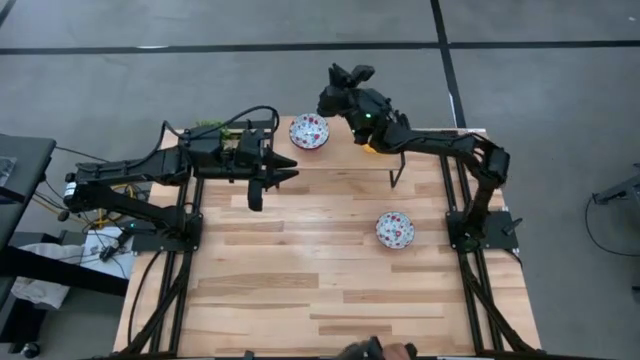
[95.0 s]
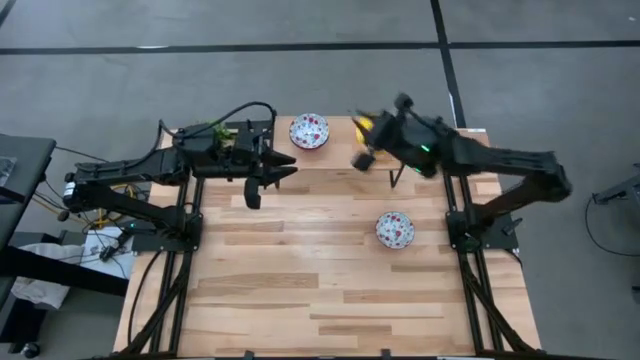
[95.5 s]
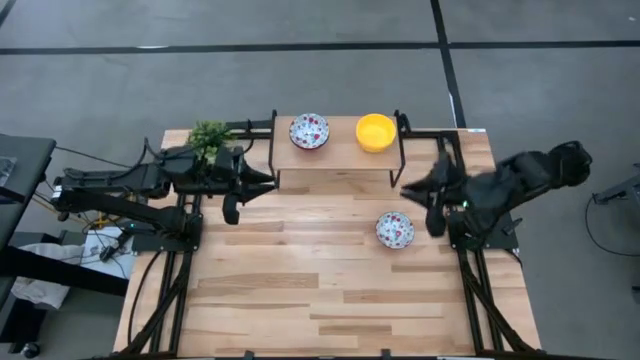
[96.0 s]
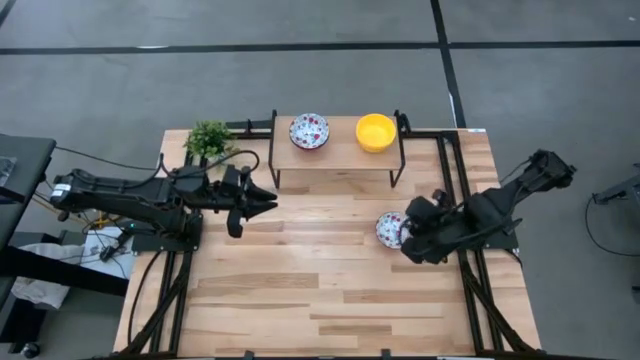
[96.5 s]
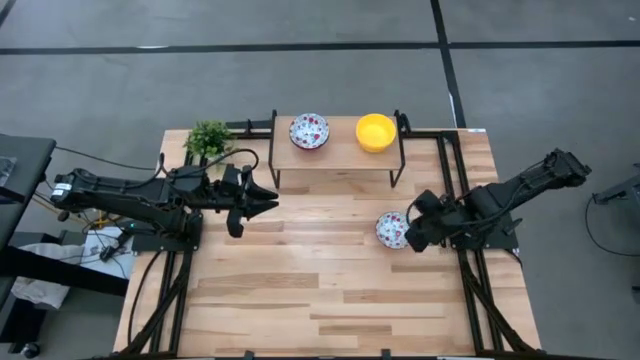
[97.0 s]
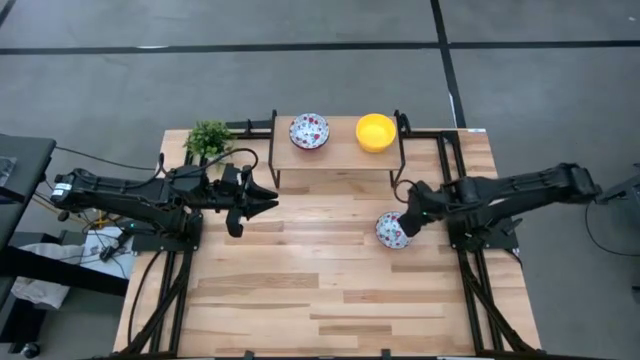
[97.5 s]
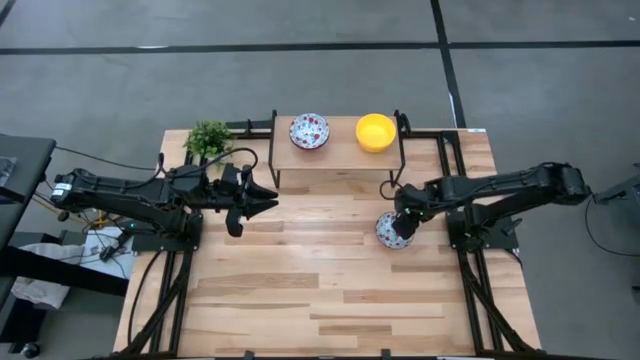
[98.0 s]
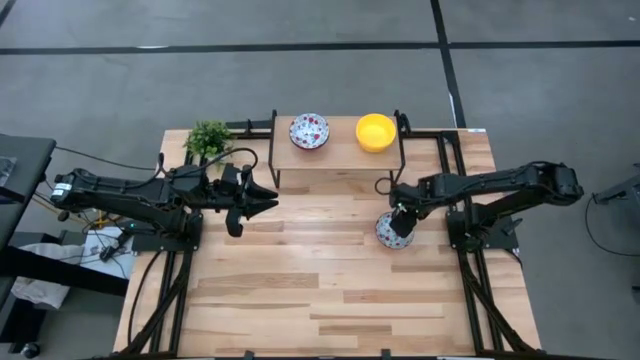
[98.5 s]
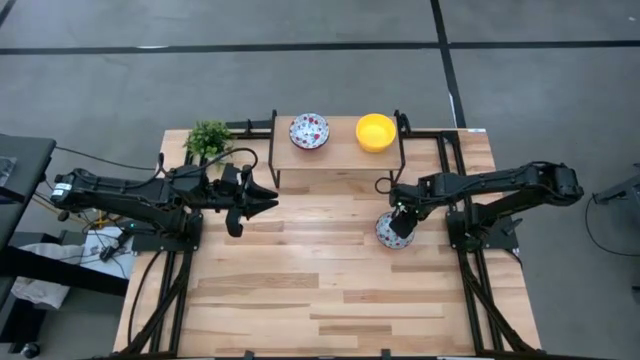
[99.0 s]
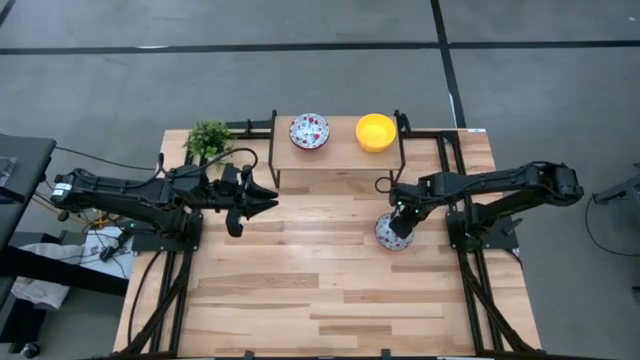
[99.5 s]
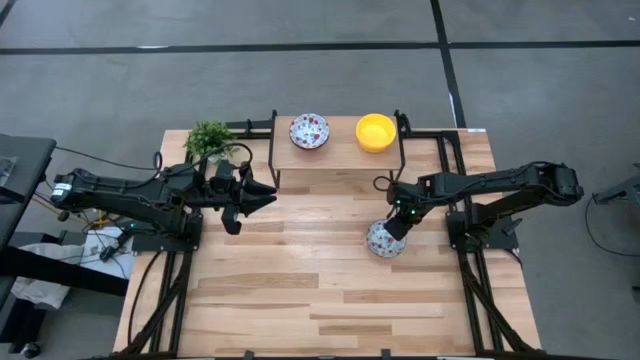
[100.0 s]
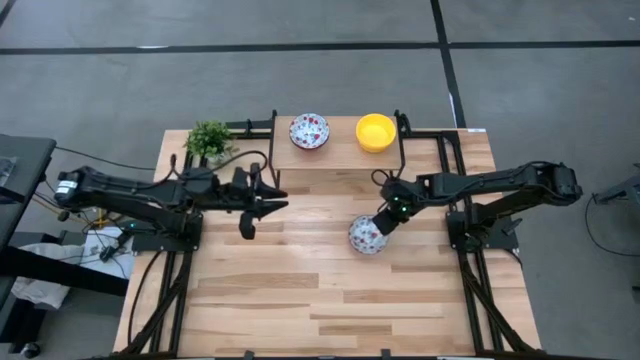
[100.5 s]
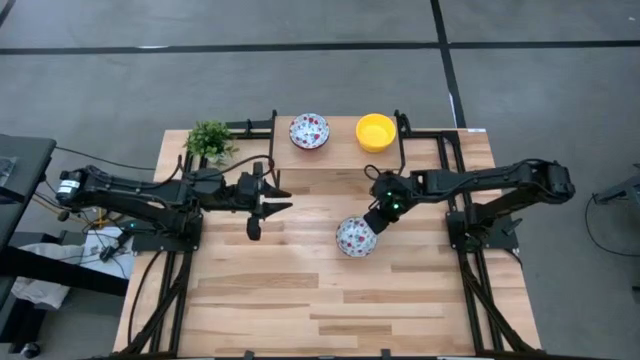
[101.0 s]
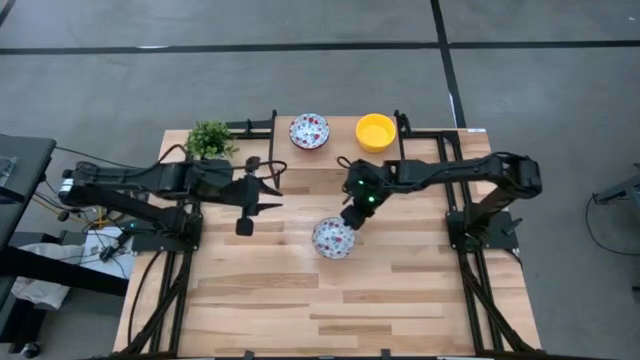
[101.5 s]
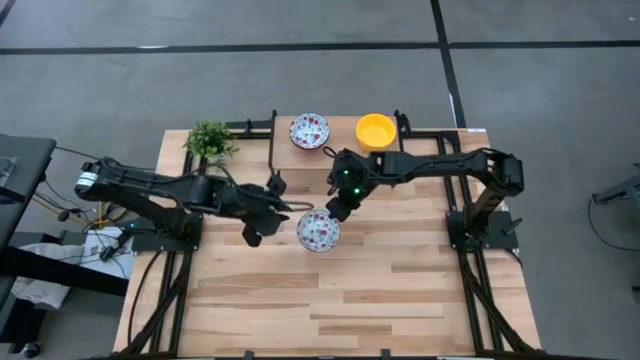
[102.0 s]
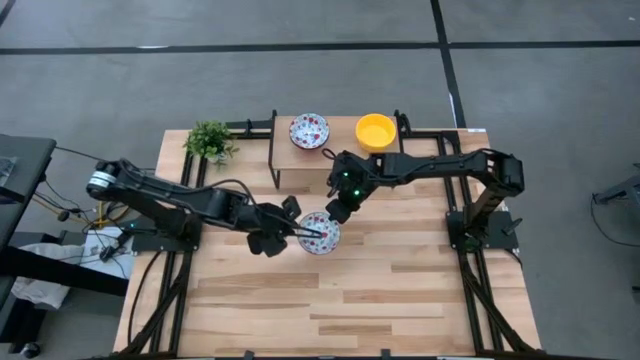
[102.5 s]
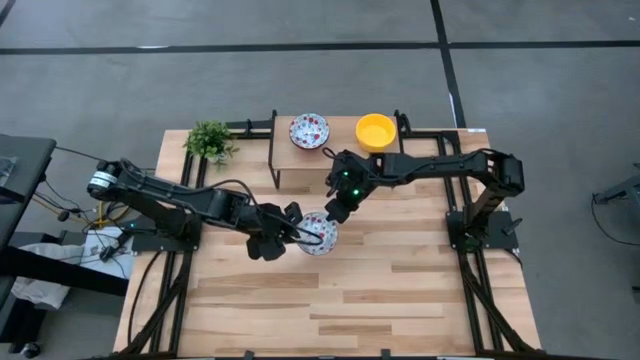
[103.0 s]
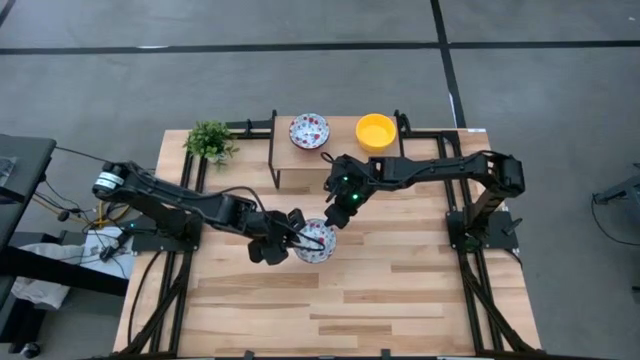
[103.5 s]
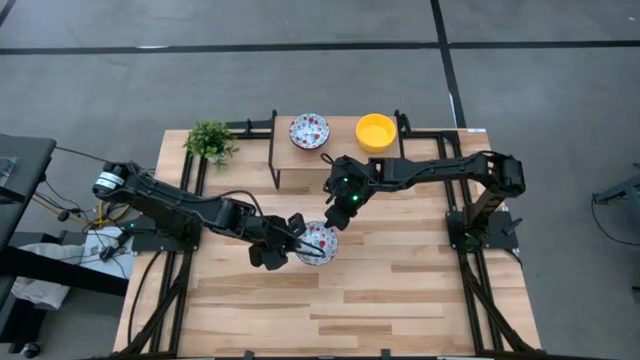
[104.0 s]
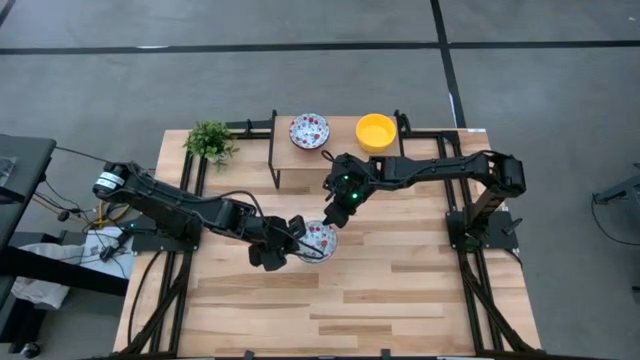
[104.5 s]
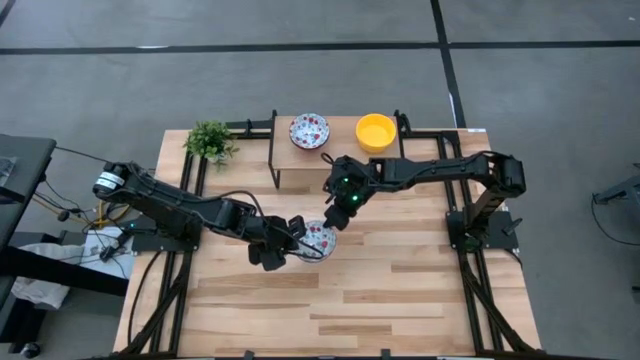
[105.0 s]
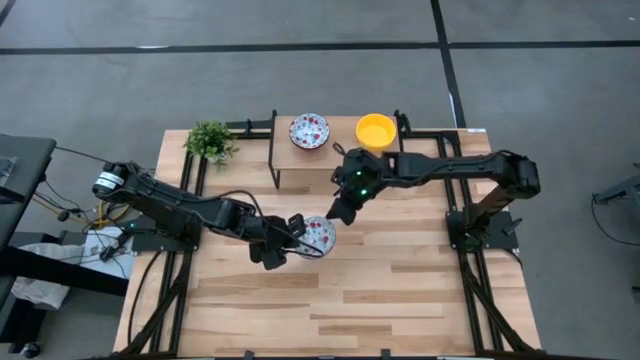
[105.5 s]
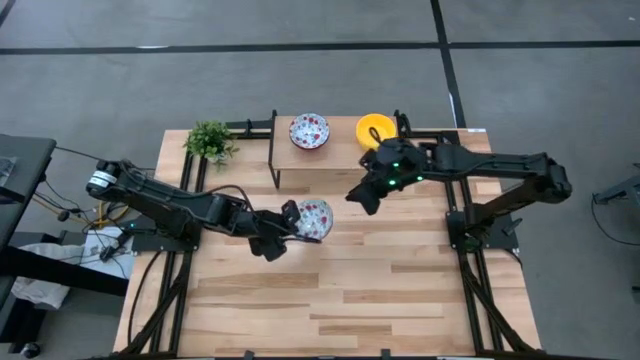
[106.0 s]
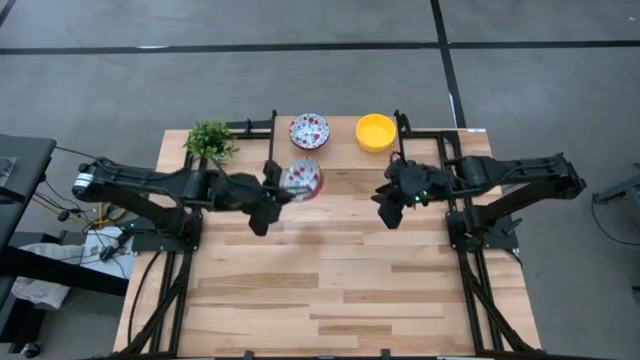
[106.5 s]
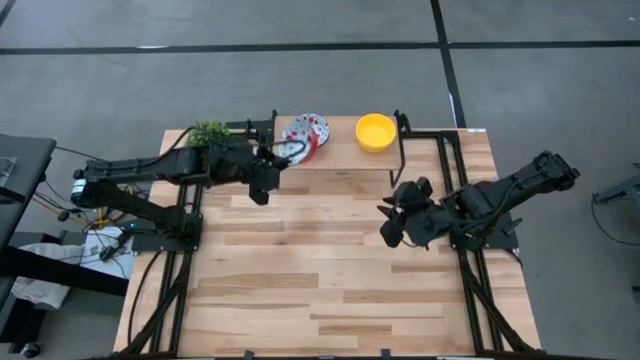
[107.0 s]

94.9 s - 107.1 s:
Task: Pick & Place Mini bowls
Stack the patterned bowl on top of the patterned bowl on the shelf

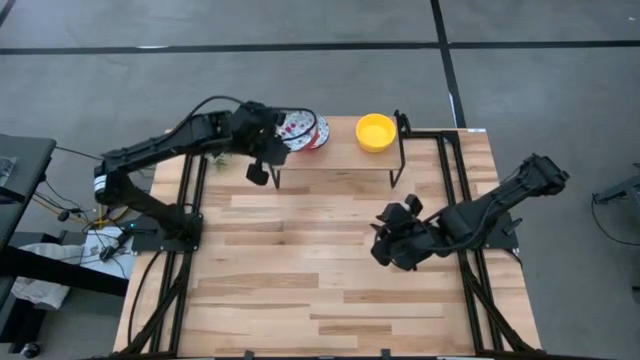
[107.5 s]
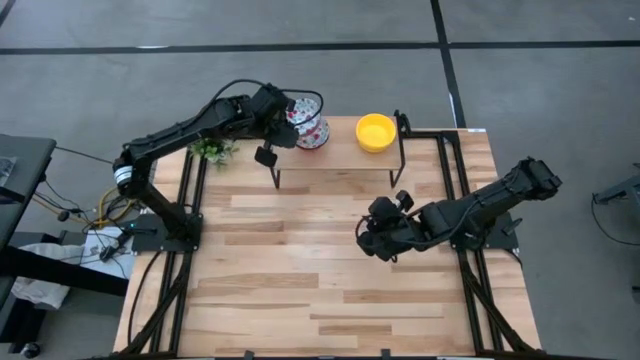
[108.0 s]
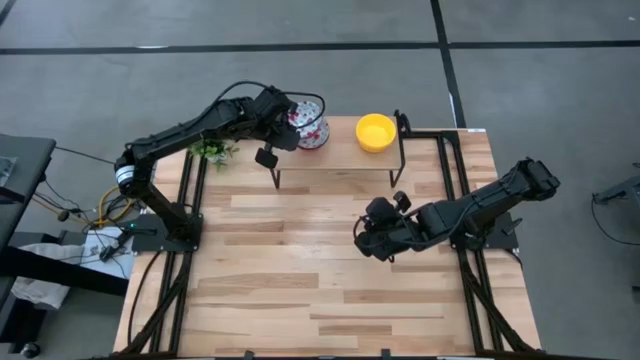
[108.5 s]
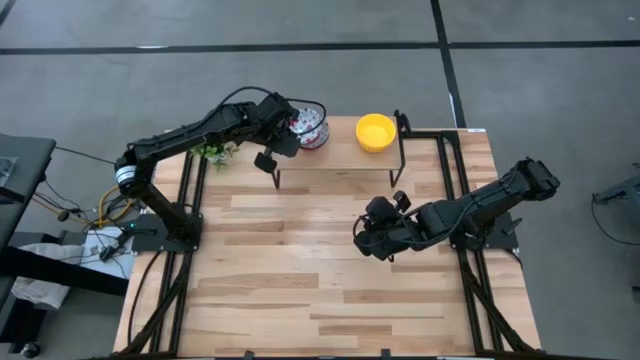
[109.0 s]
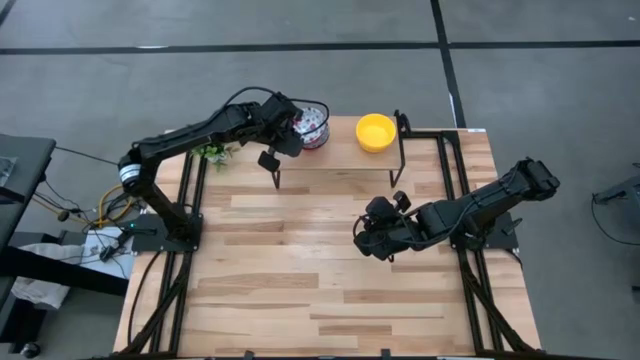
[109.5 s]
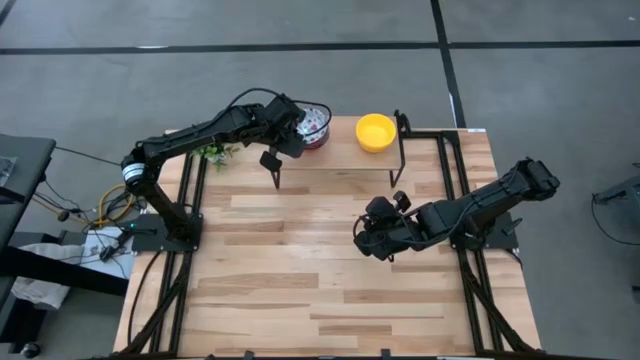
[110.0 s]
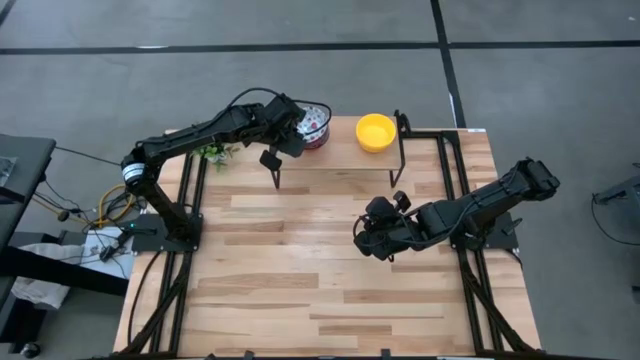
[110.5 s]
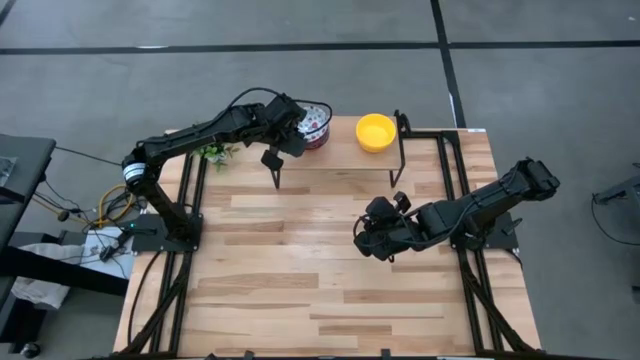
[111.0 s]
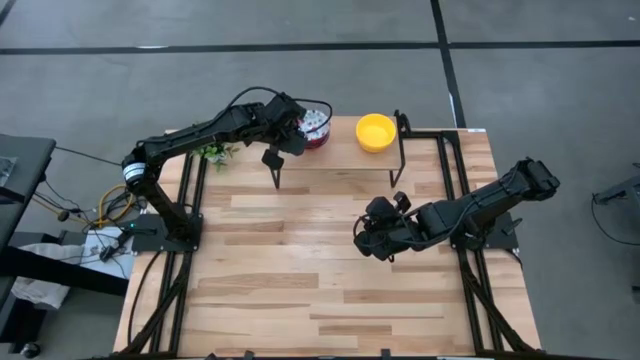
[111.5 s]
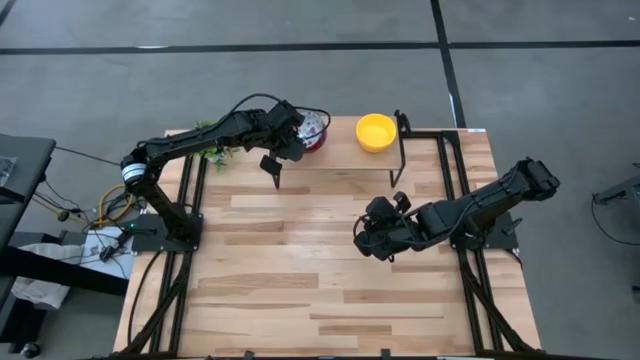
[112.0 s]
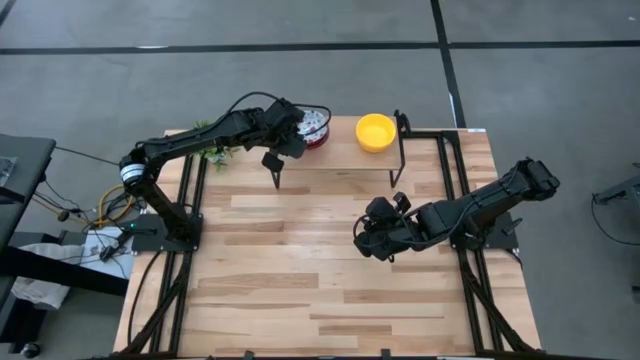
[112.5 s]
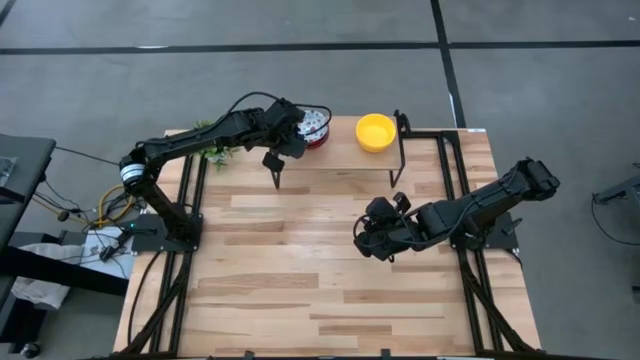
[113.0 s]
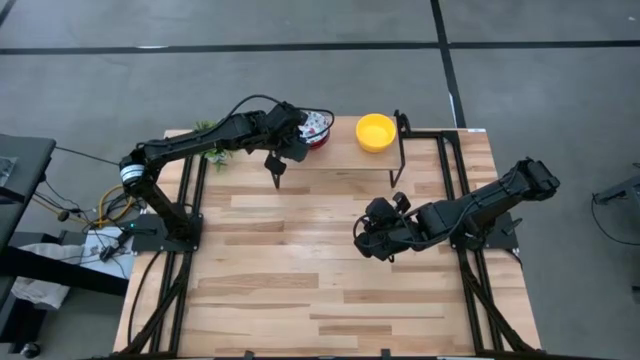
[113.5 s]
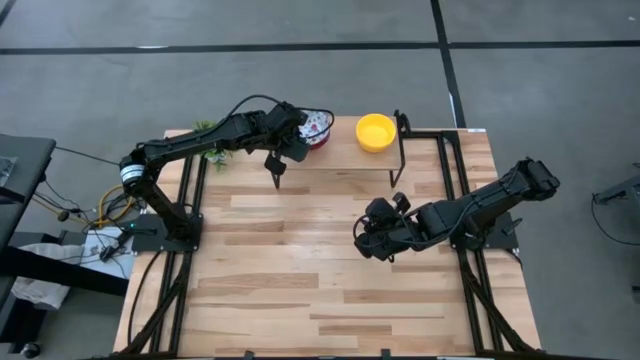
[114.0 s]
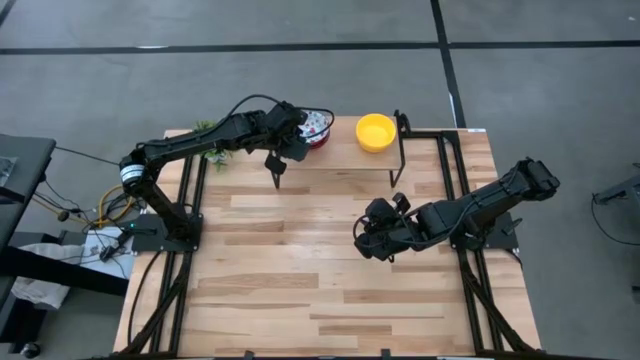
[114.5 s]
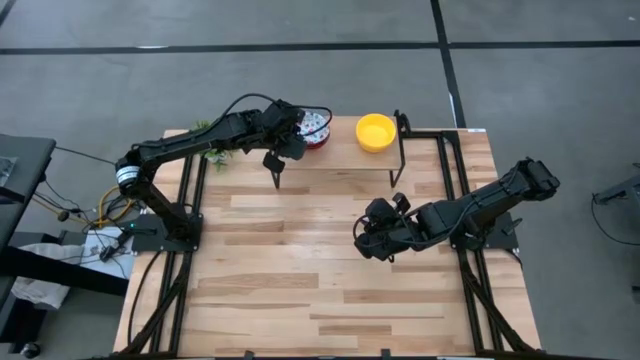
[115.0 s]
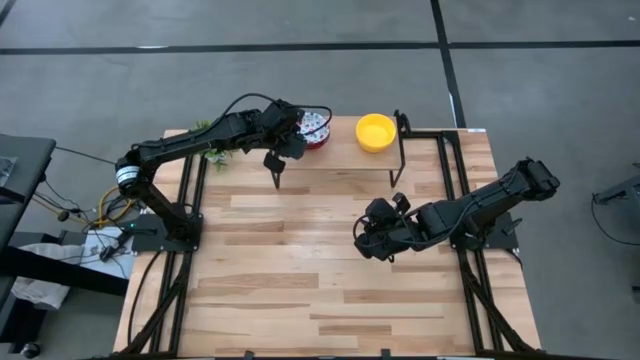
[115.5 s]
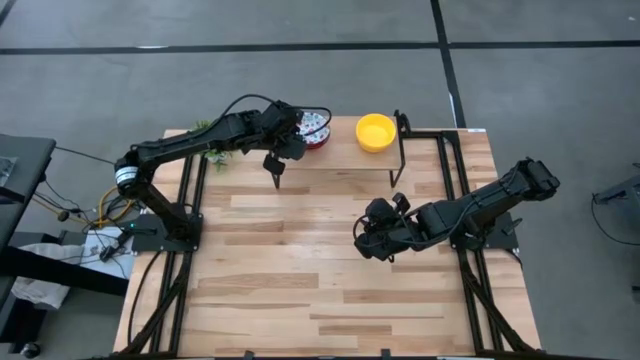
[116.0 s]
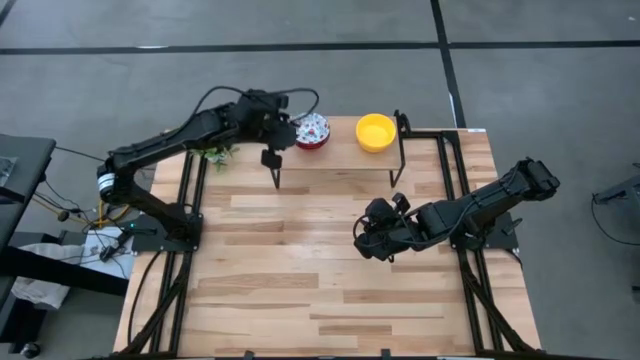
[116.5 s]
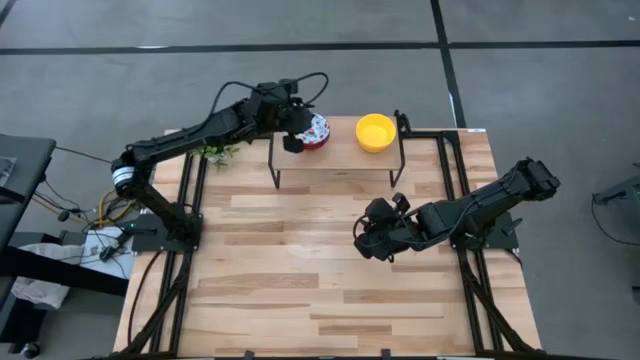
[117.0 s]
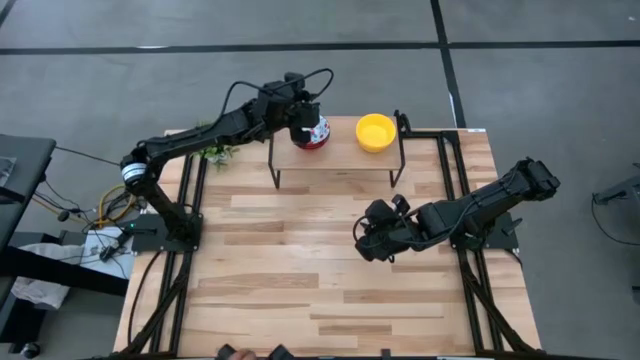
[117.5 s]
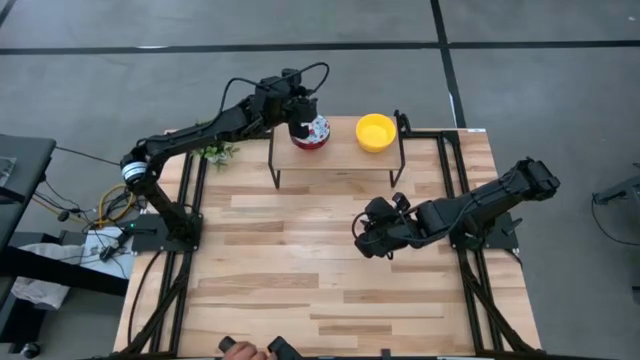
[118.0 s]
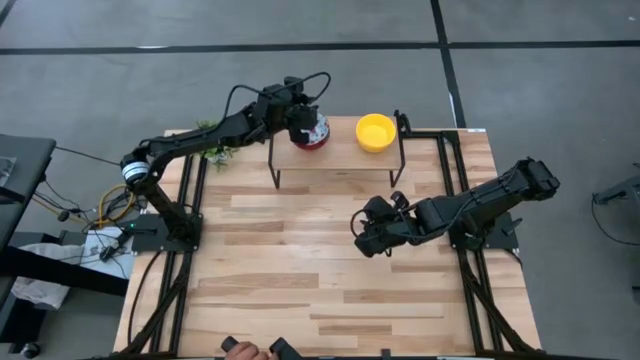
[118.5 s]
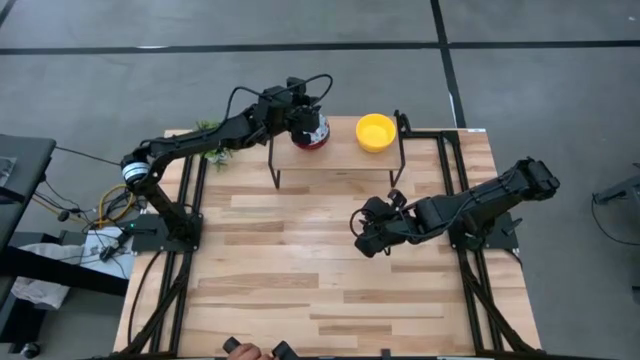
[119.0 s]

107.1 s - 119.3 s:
Stack the patterned bowl on top of the patterned bowl on the shelf
